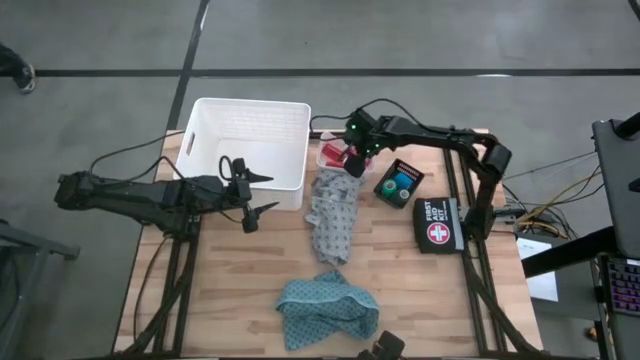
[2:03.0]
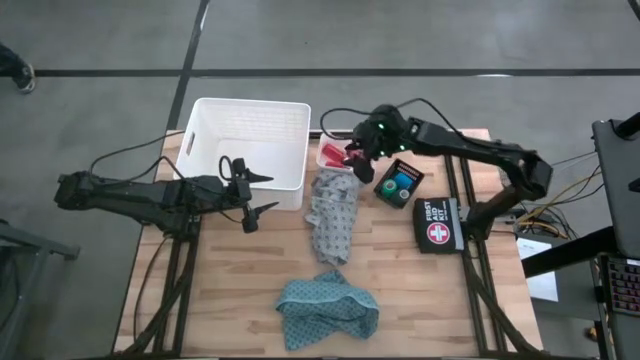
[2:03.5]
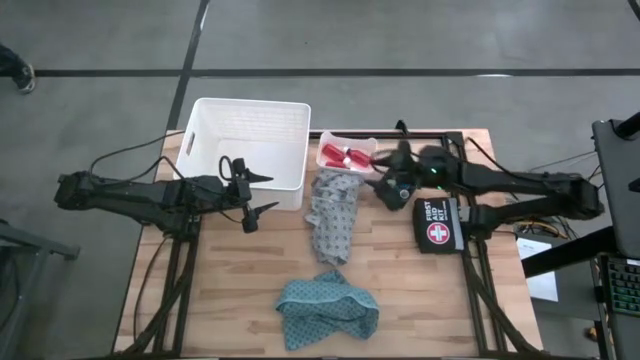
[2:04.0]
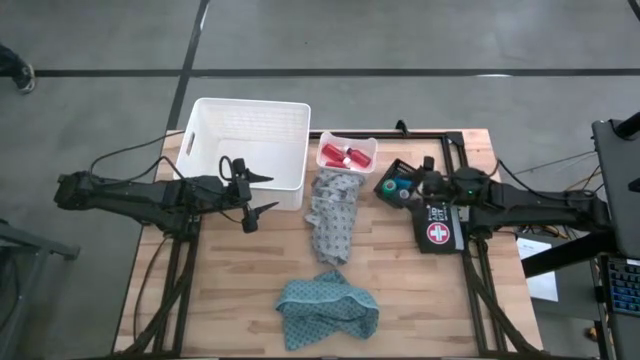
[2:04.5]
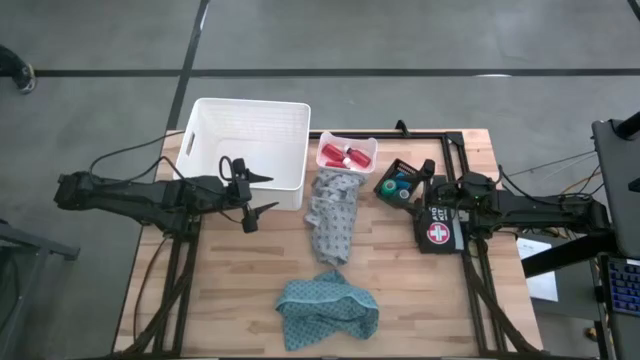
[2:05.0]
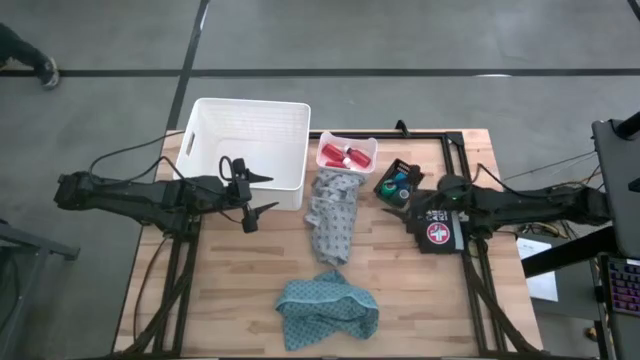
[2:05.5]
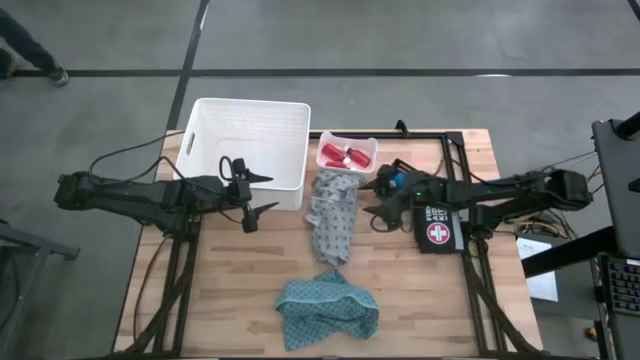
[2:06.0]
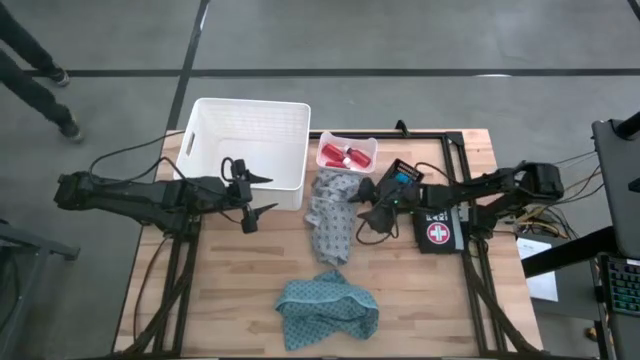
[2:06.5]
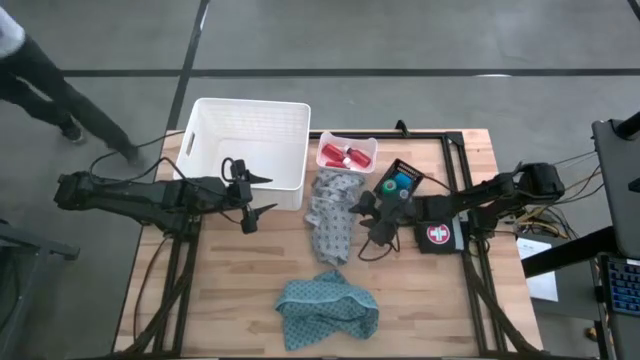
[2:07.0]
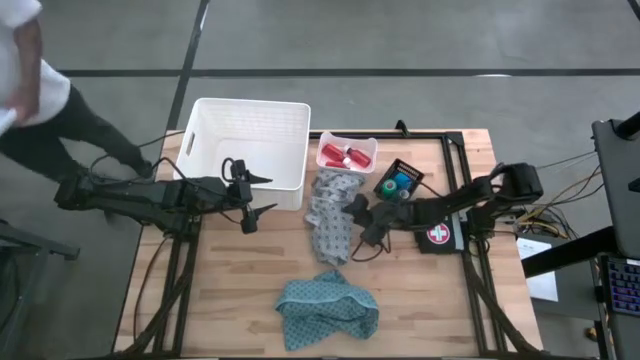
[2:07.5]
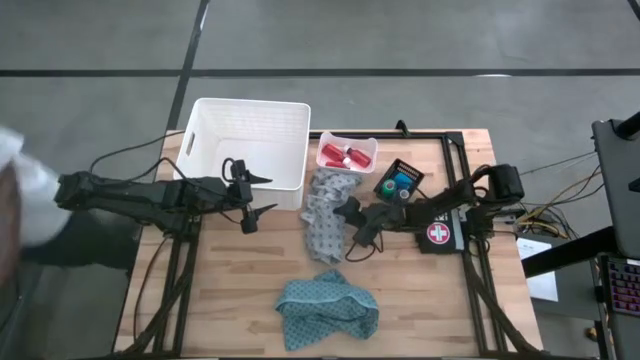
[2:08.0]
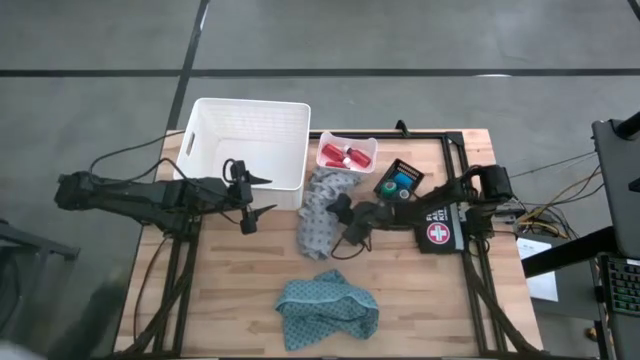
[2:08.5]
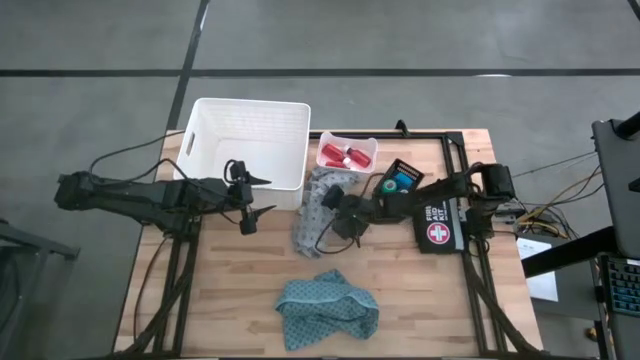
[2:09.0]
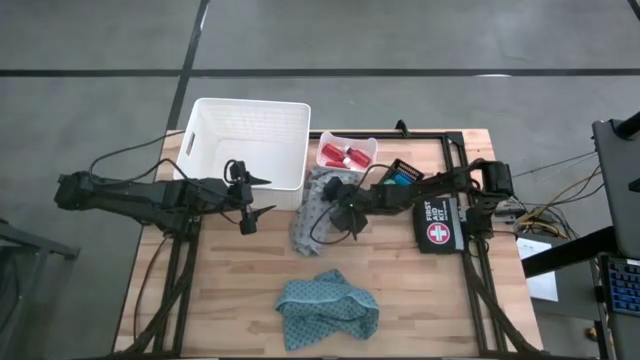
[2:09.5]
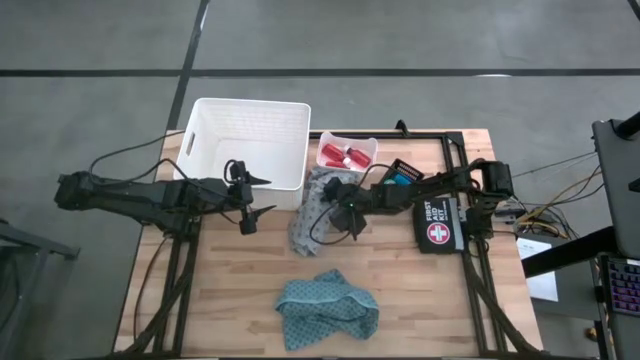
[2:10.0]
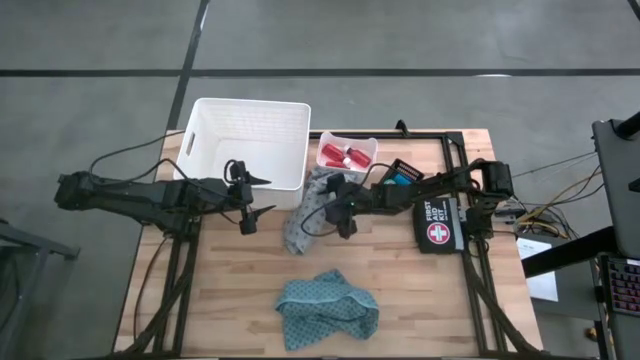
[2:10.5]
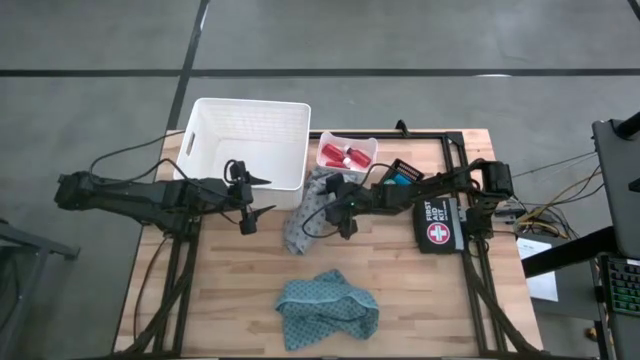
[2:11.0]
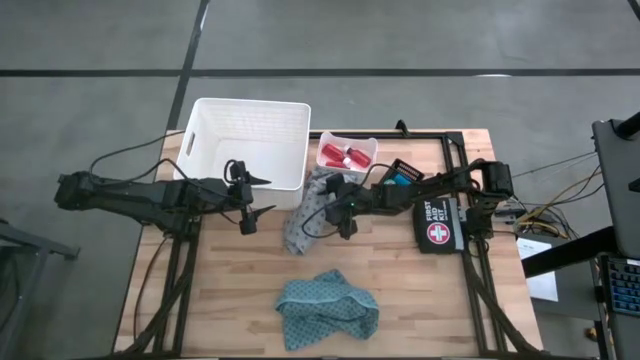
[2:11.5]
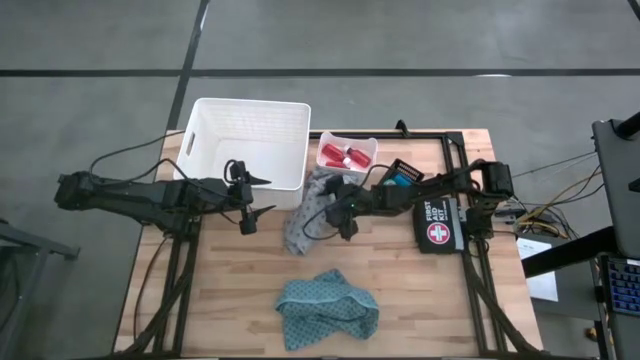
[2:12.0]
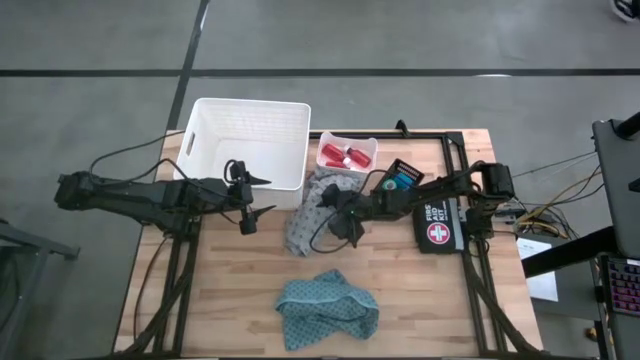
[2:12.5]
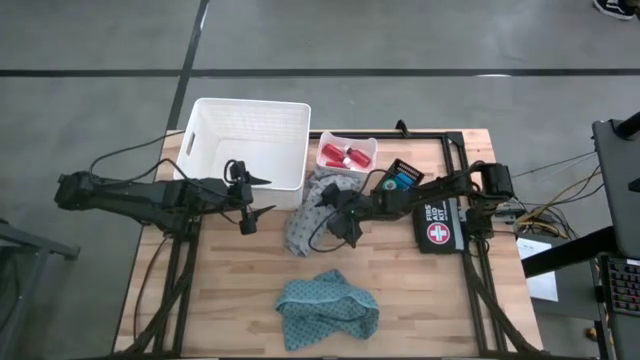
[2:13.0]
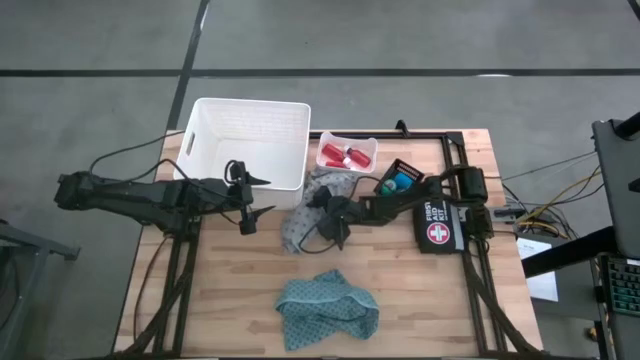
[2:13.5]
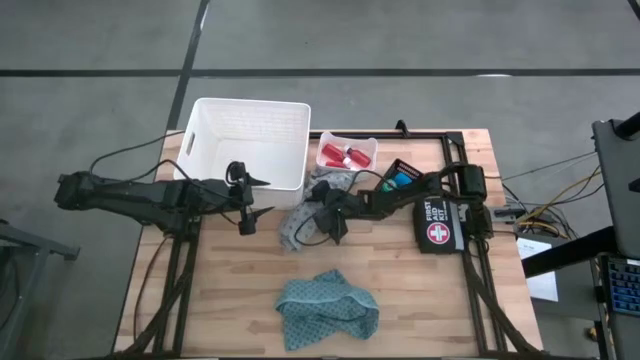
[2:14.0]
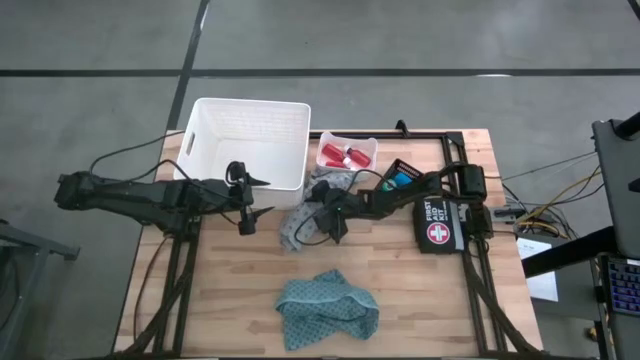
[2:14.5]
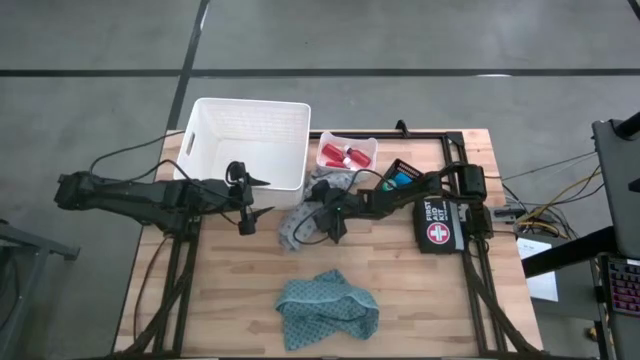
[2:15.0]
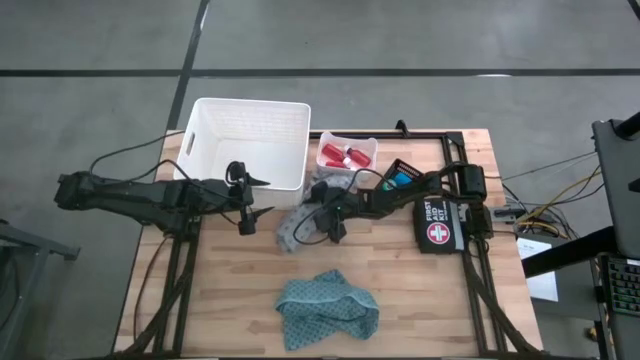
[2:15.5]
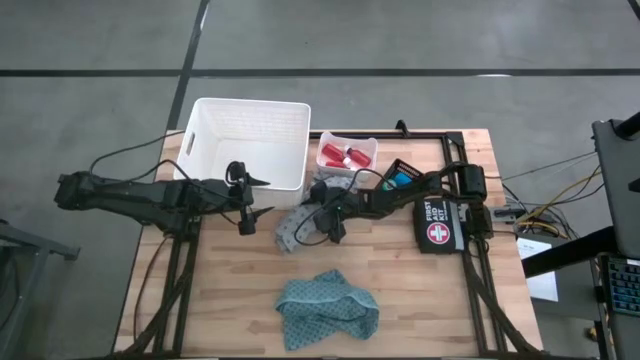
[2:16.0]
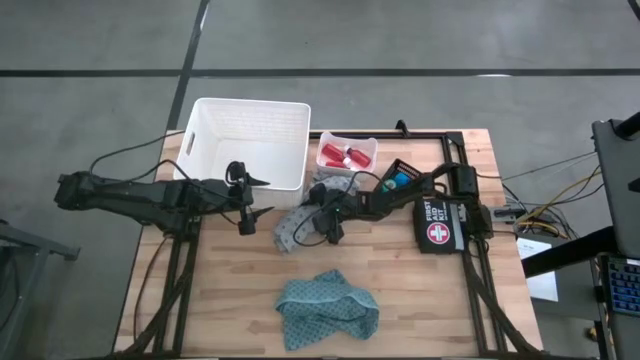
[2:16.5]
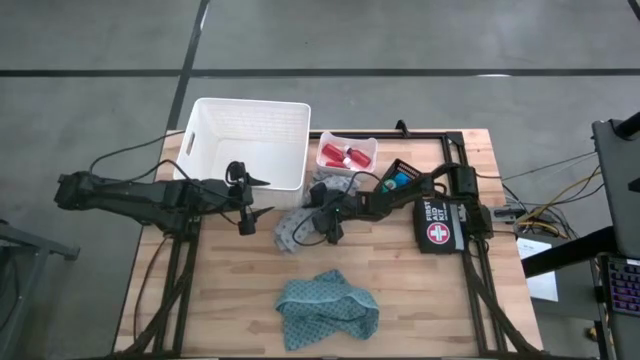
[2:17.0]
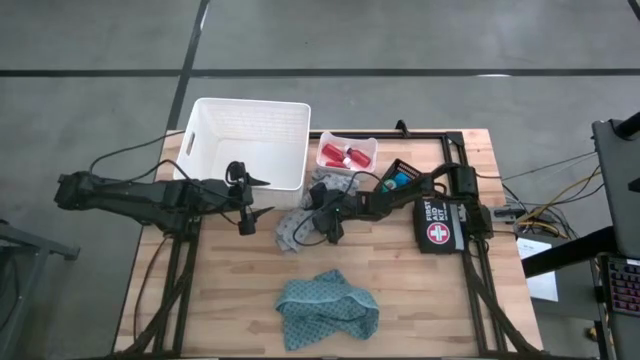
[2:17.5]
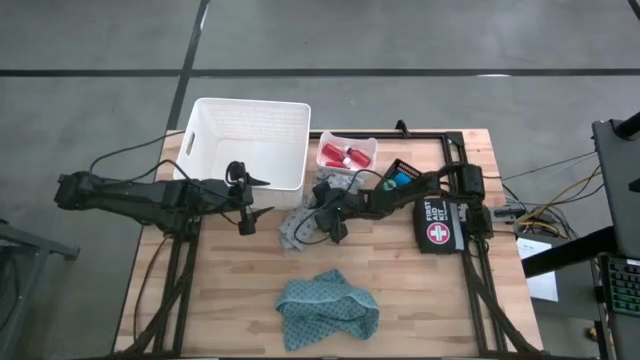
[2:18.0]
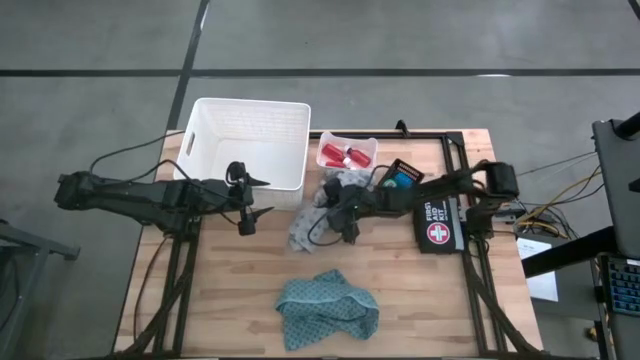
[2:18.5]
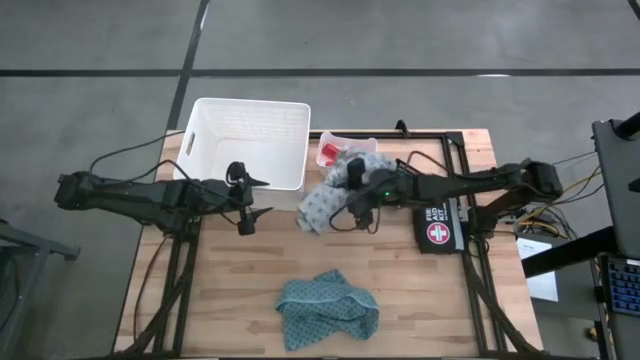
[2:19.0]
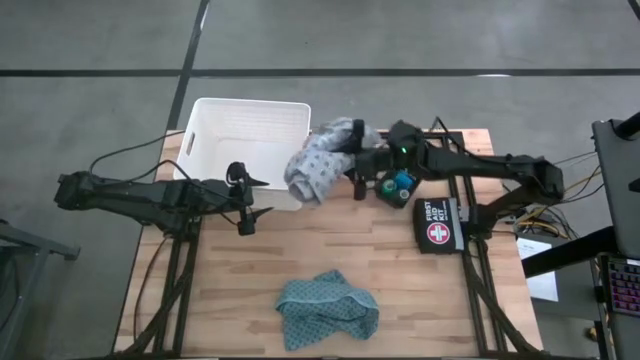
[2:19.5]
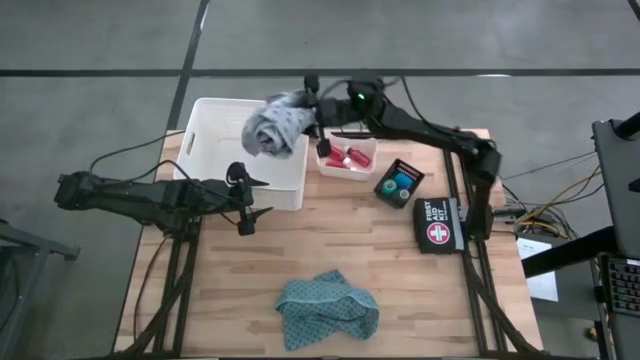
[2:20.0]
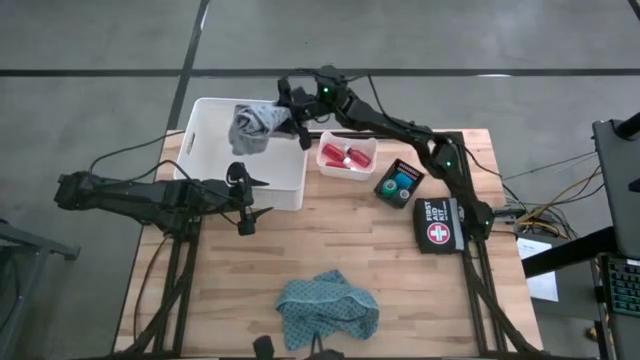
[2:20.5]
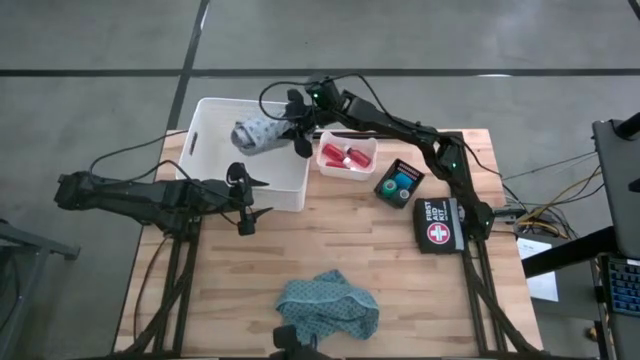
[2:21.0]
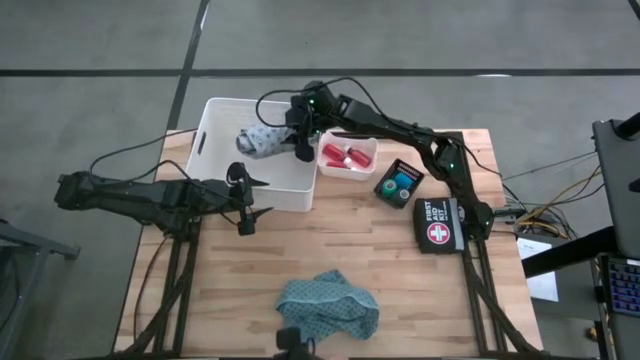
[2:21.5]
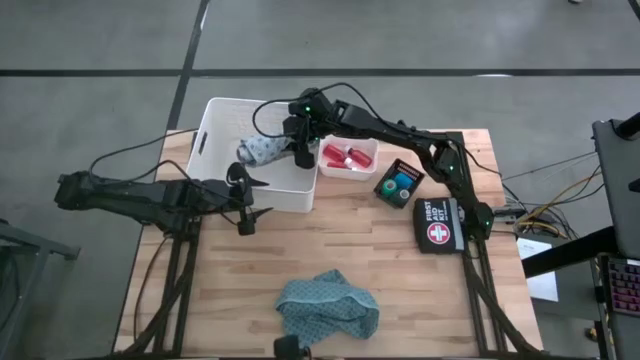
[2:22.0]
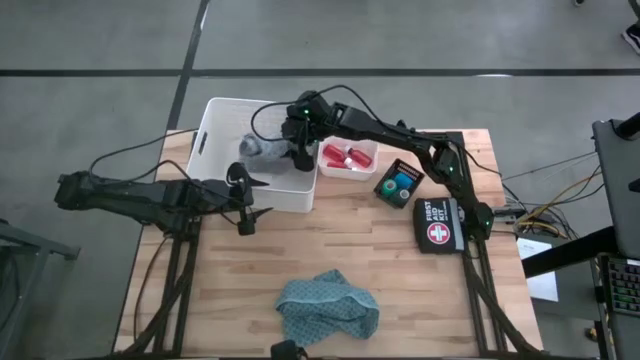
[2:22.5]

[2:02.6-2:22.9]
Task: Pick & Place Medicine items
Put the gray patient gown into the big white bin
